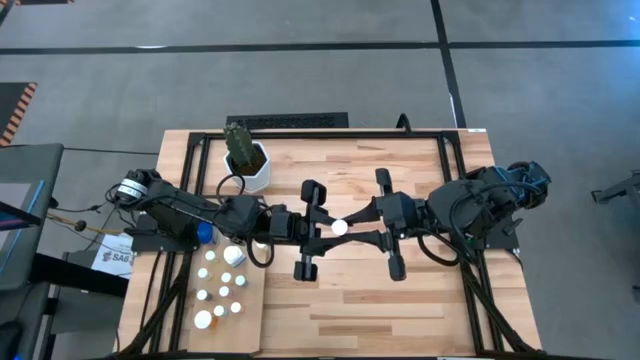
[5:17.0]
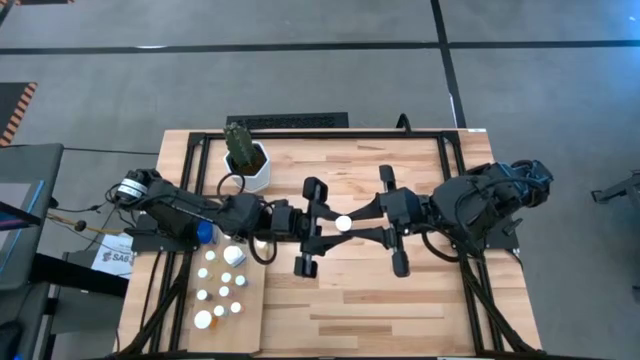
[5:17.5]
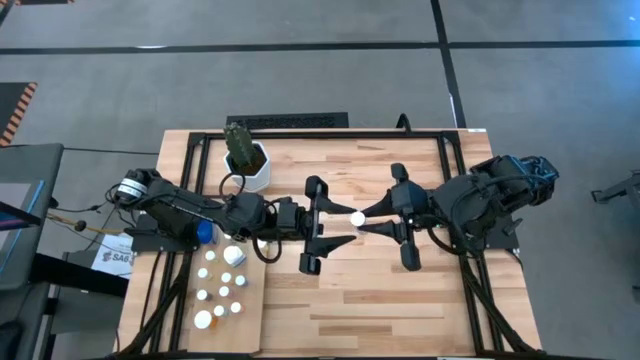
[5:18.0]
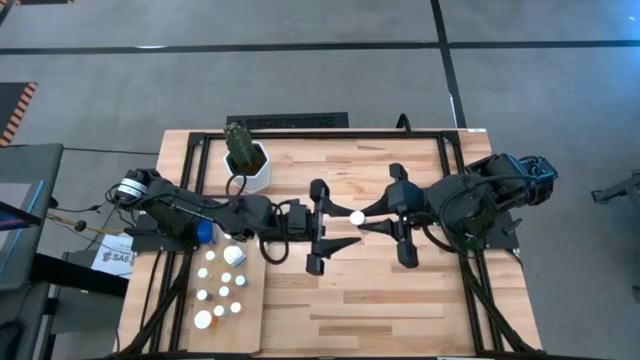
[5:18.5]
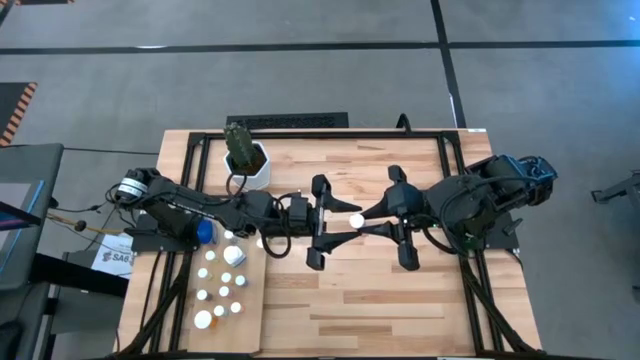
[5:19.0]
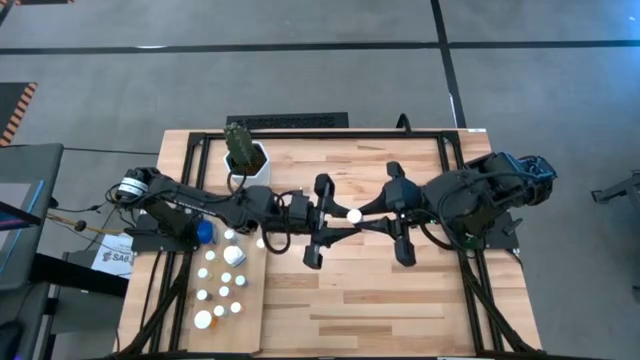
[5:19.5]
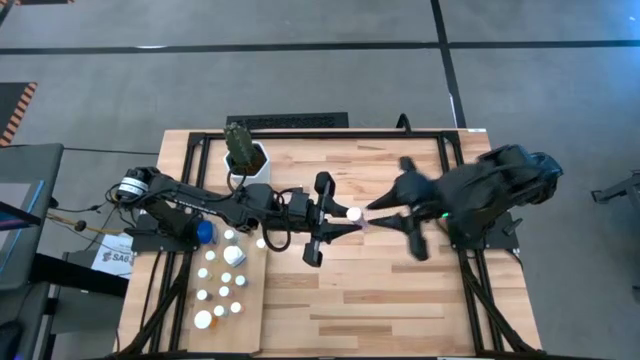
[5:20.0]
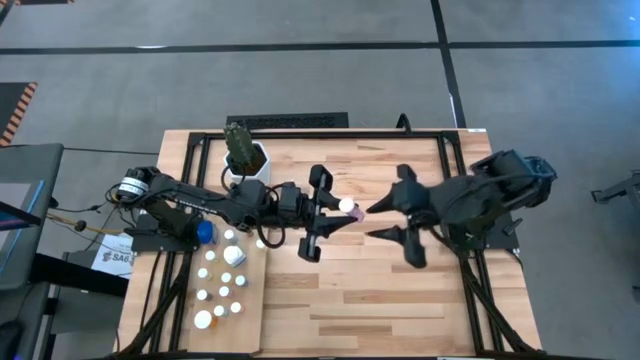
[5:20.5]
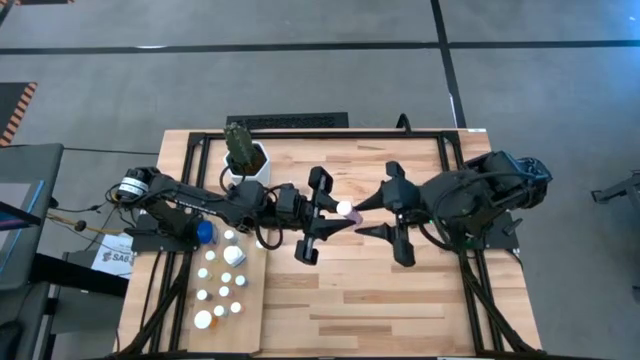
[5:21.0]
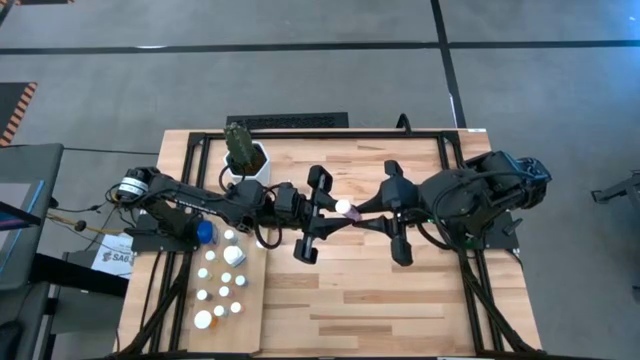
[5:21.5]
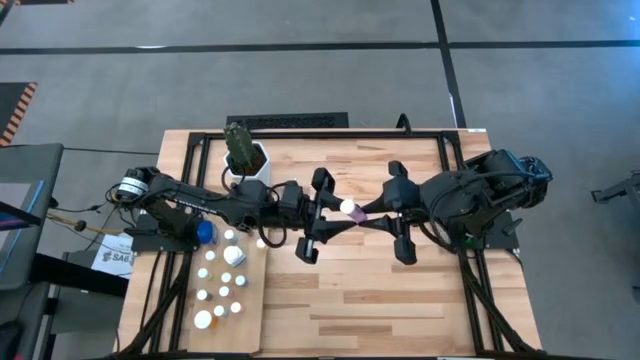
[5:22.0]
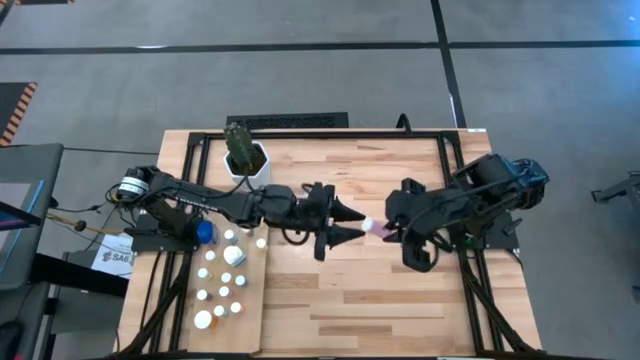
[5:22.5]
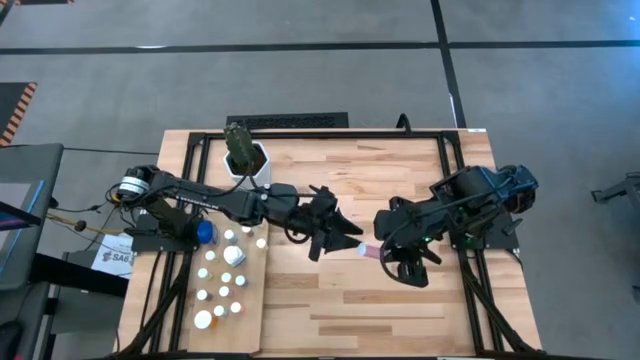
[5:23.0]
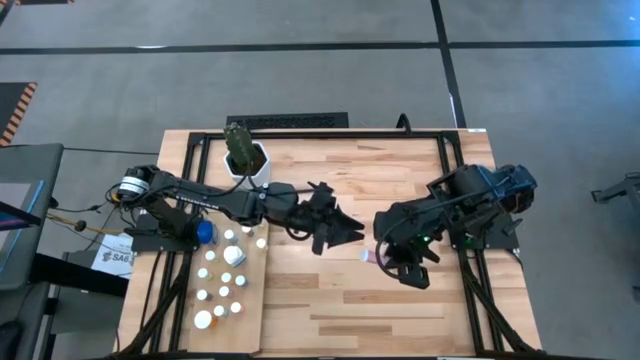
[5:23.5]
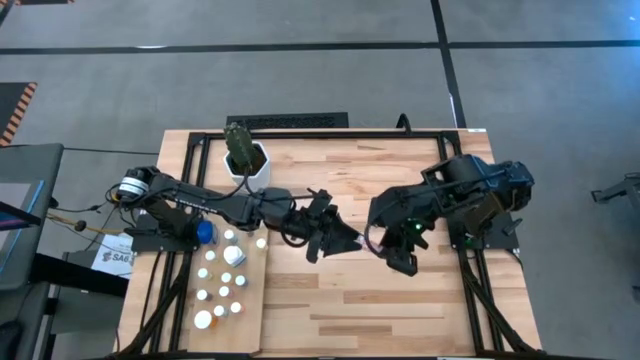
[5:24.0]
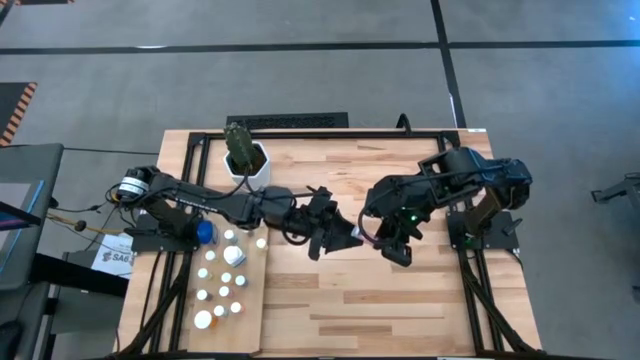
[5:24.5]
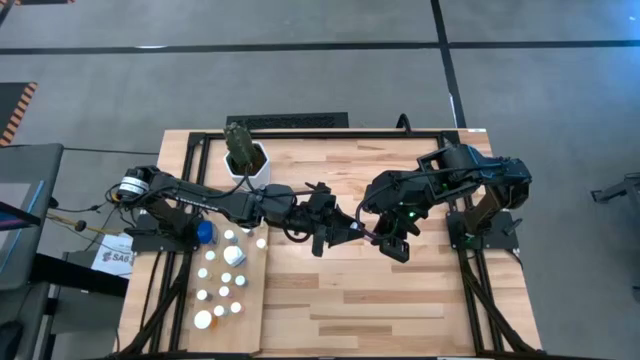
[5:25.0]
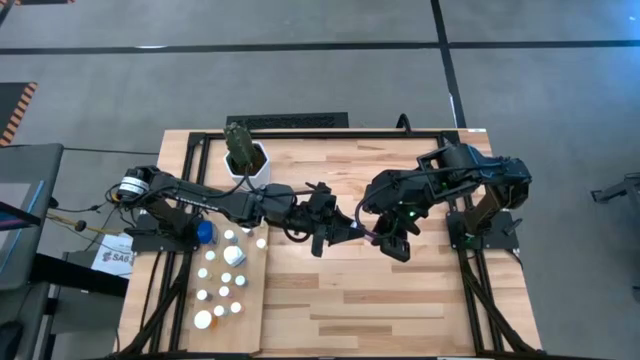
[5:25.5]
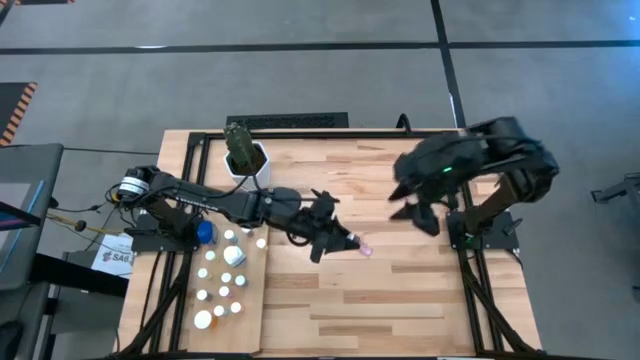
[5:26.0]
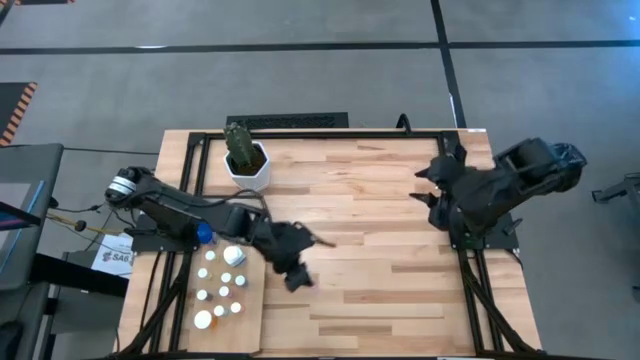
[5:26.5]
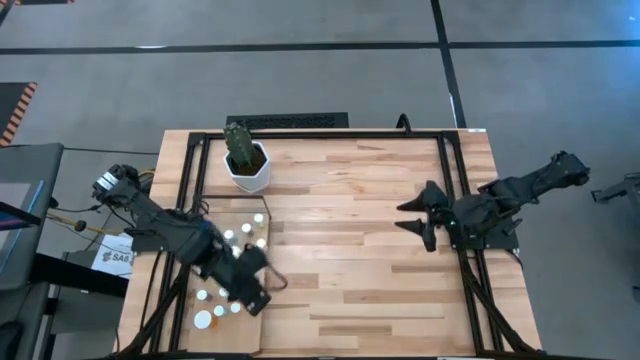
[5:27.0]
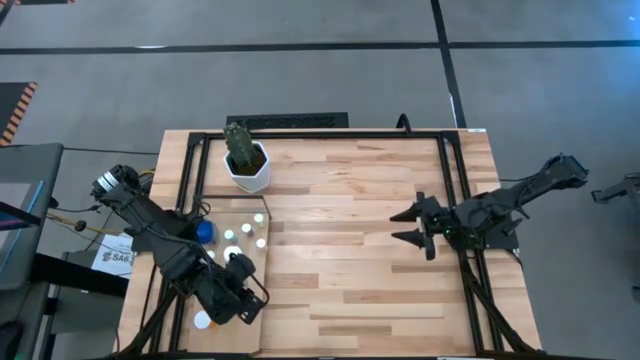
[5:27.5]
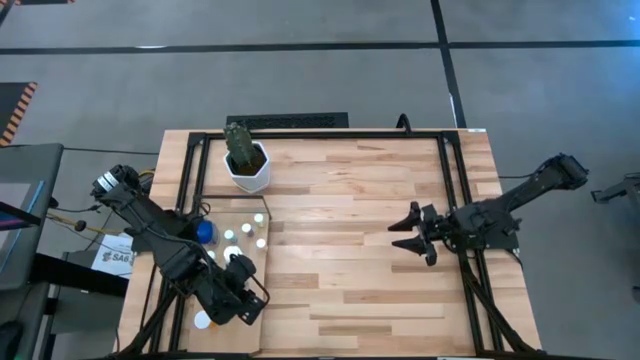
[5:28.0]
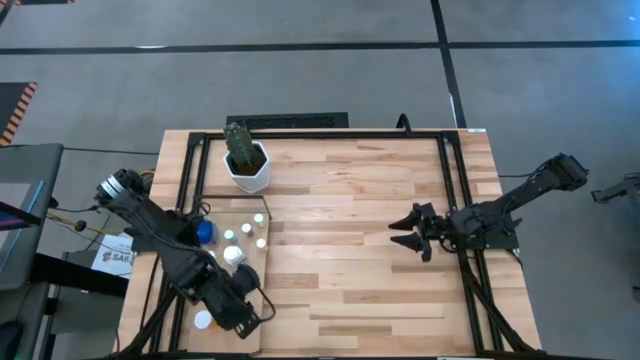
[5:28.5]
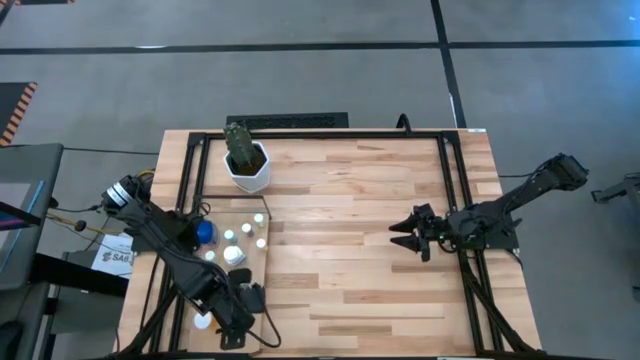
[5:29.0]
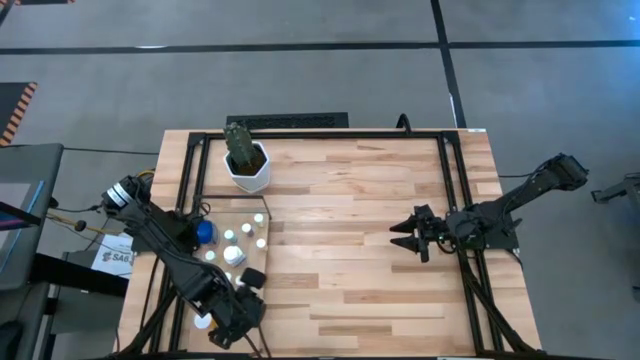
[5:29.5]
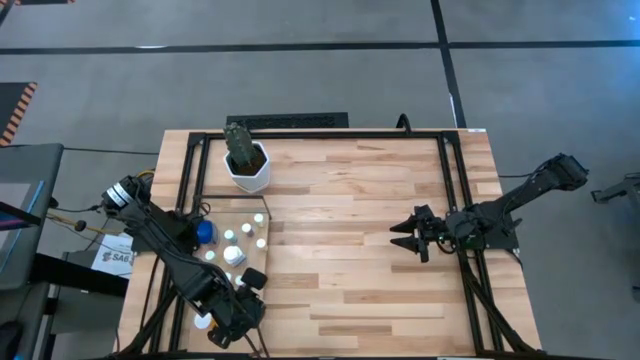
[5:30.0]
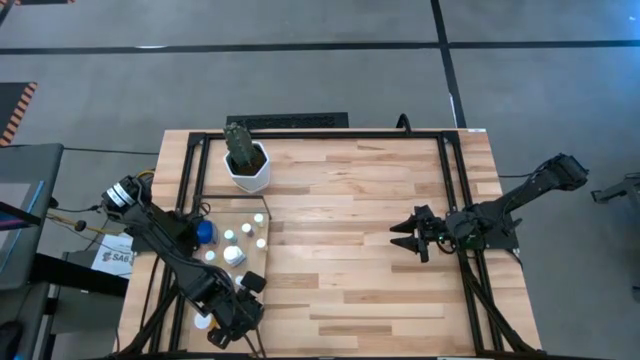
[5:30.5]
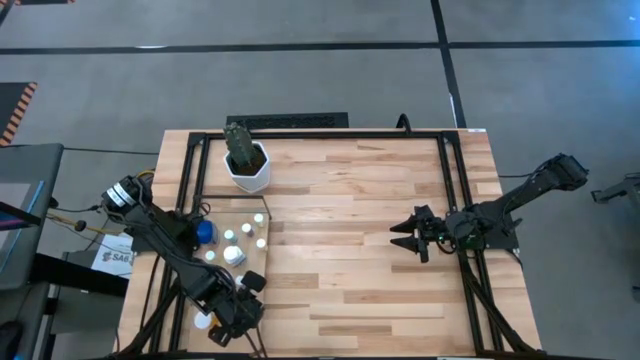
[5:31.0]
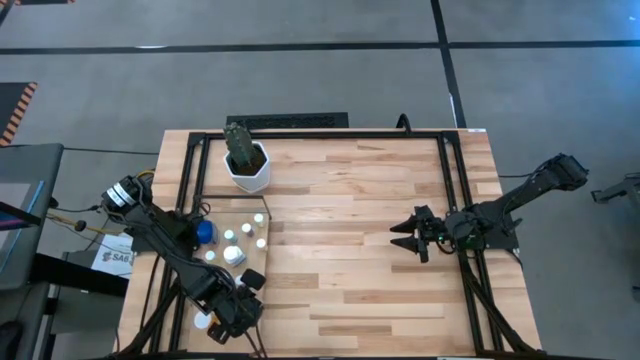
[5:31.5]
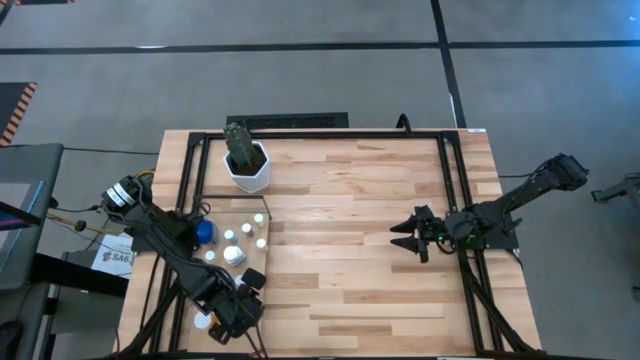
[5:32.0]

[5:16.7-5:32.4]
Task: Pick and place medicine bottles onto shelf by color
Put the pink pill bottle on the shelf
